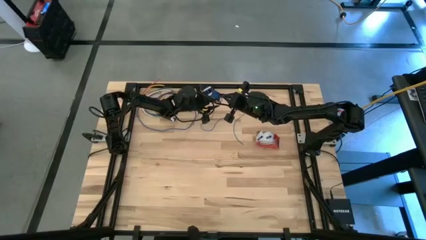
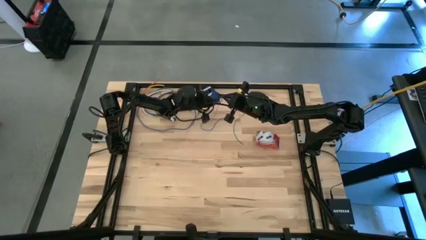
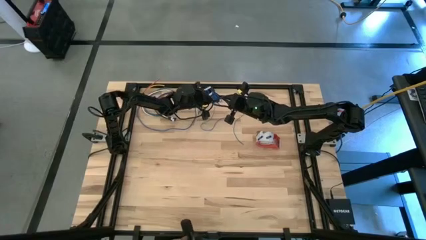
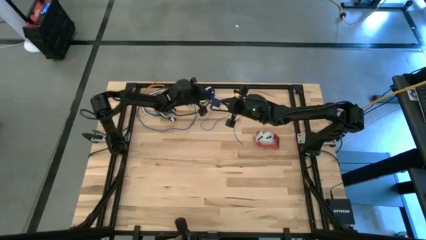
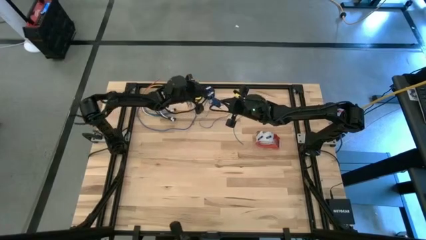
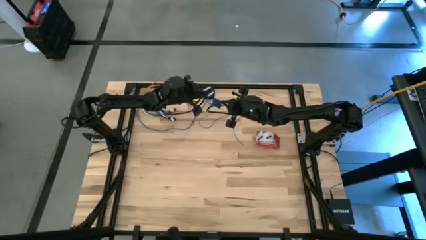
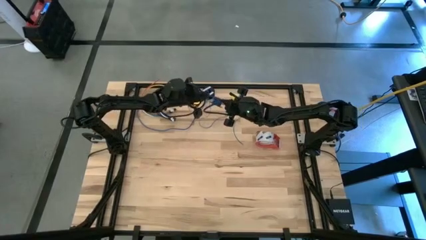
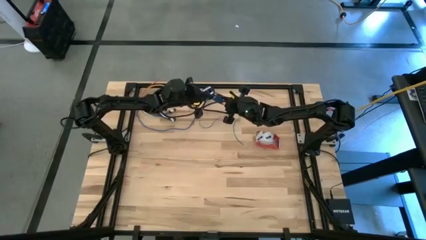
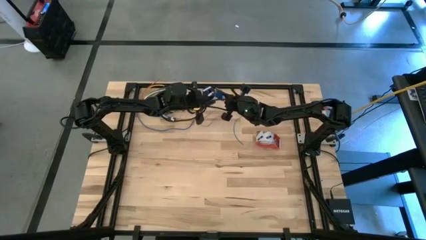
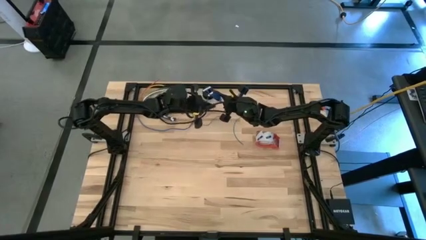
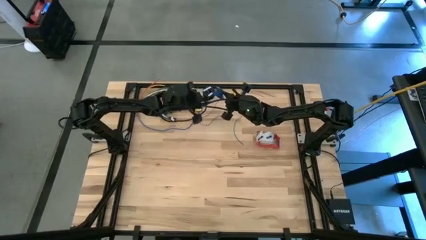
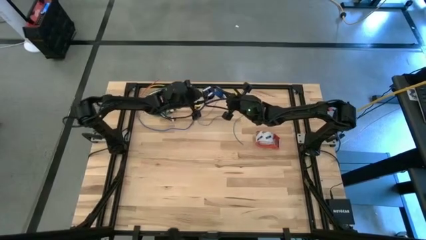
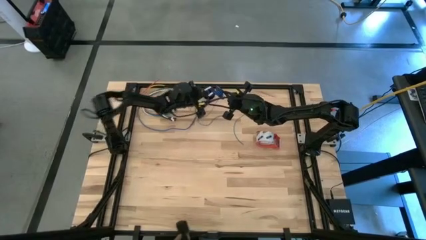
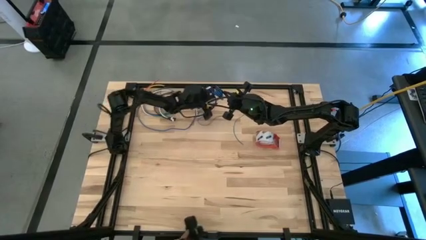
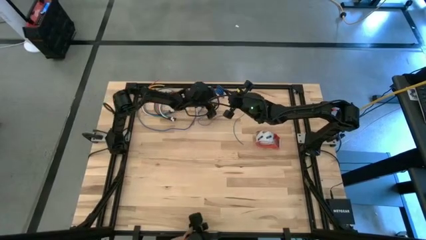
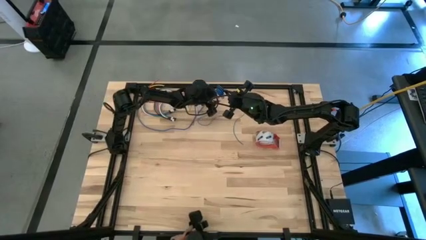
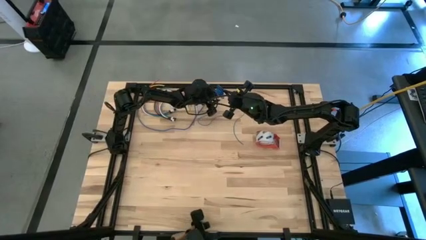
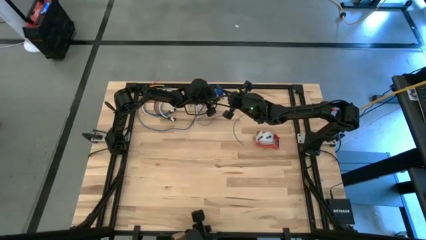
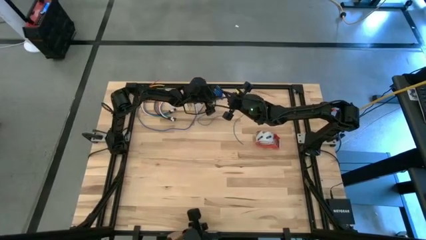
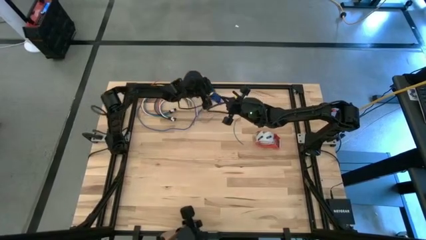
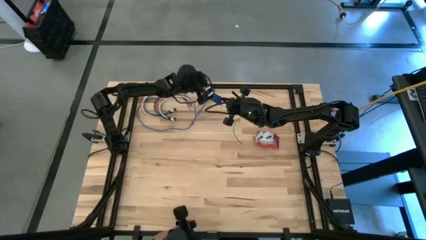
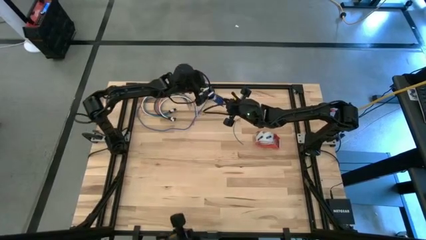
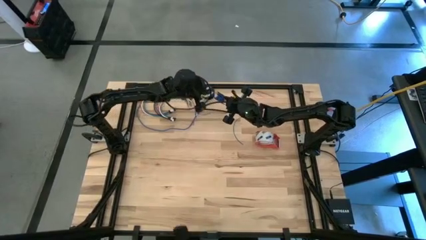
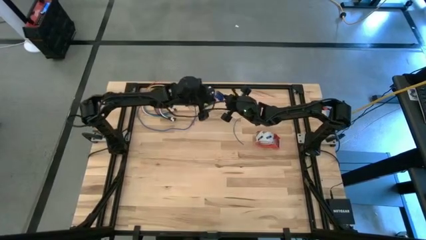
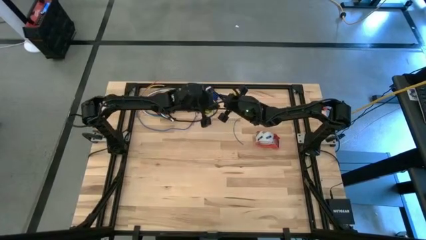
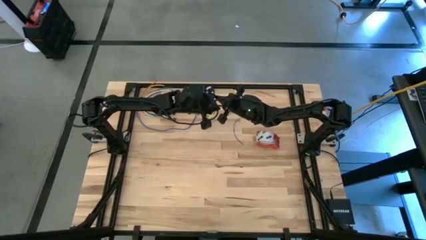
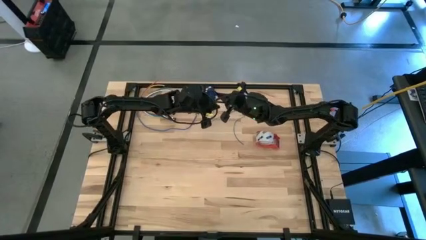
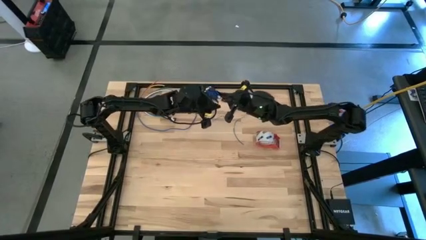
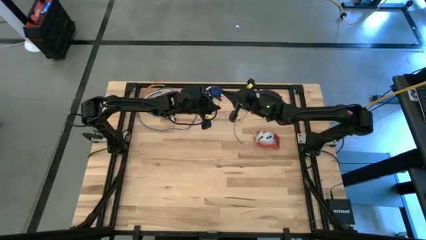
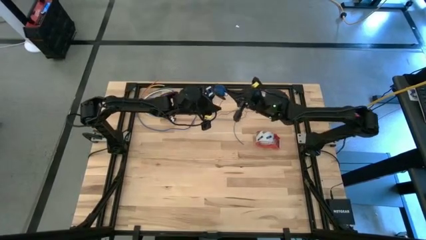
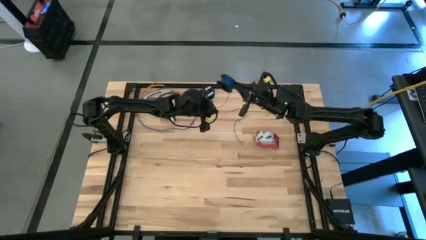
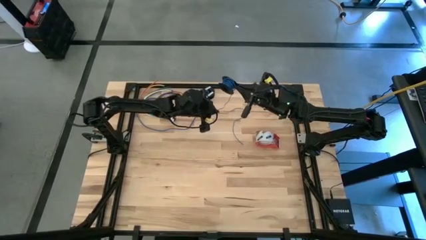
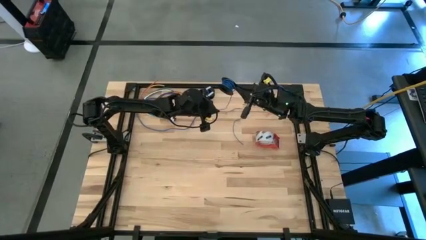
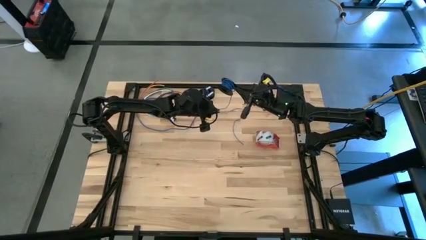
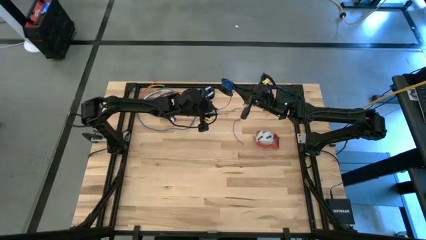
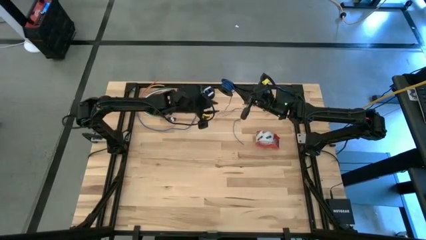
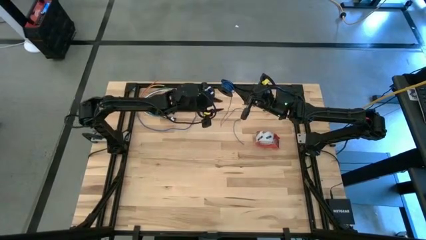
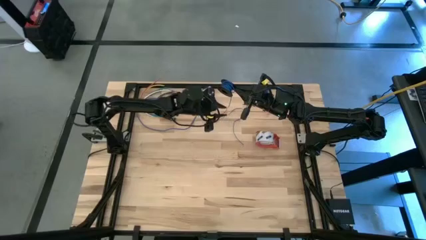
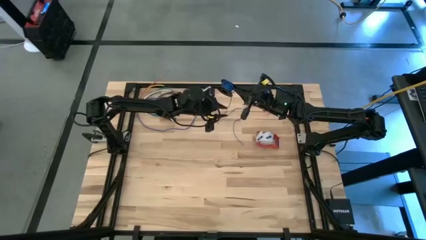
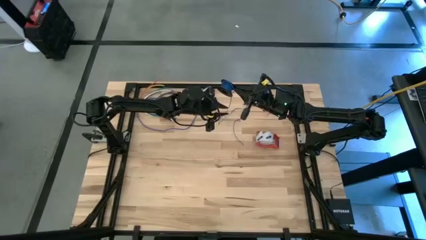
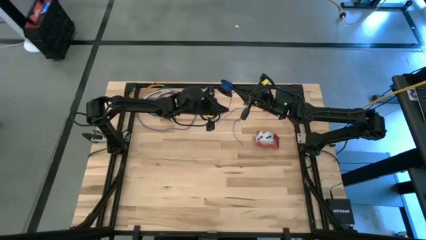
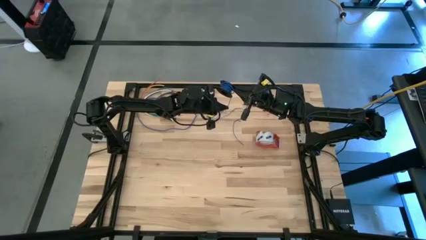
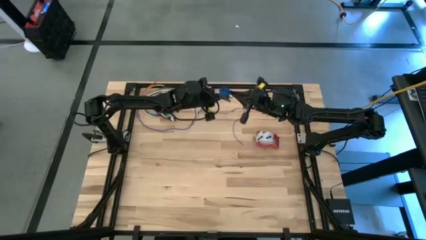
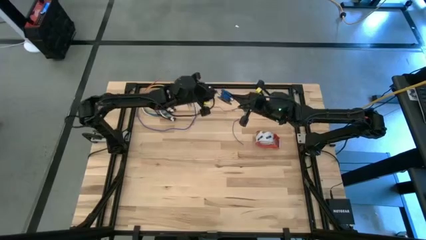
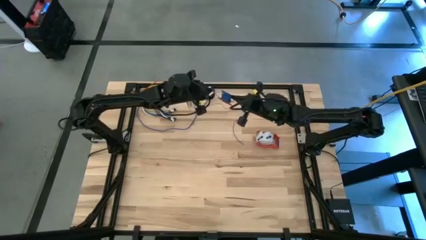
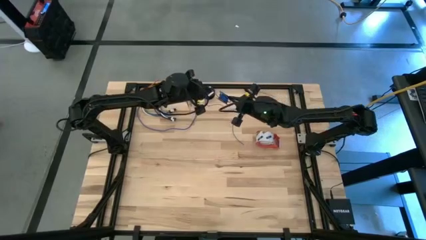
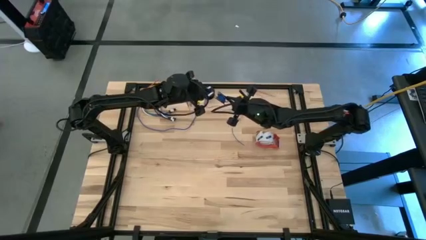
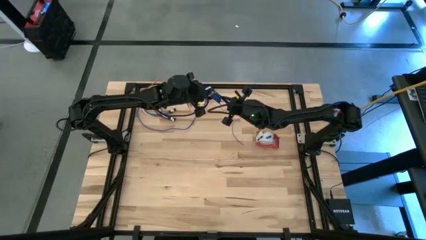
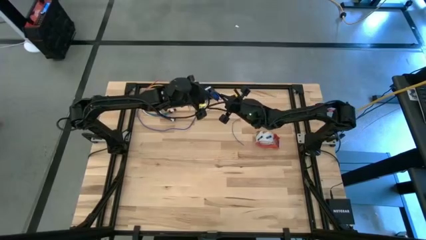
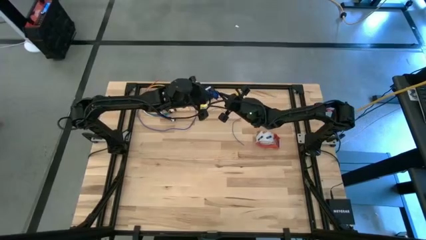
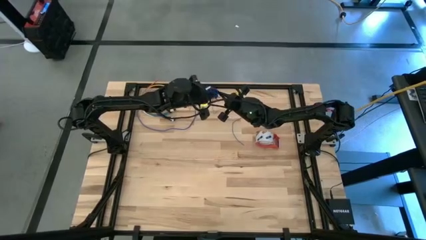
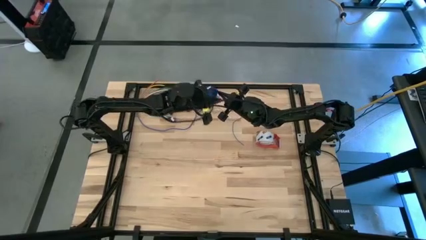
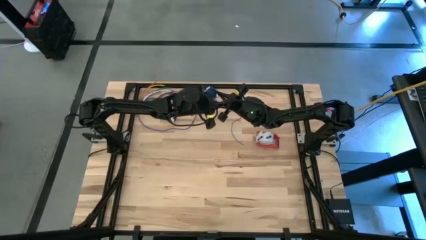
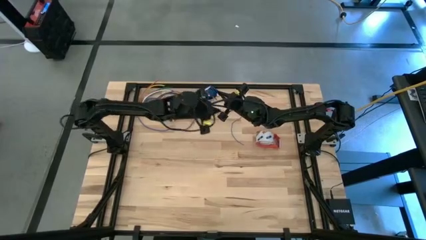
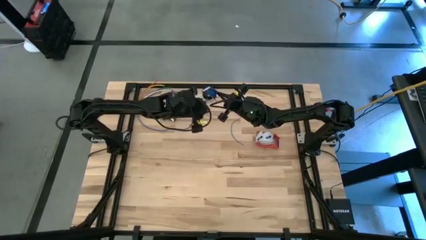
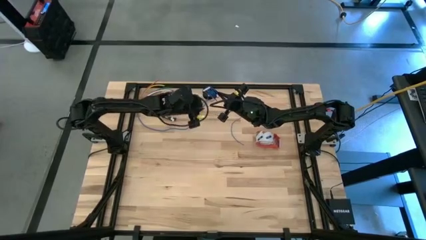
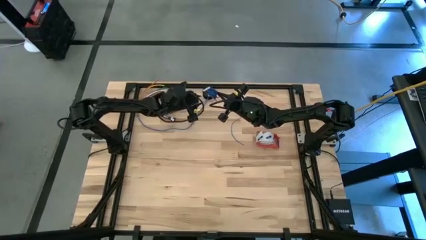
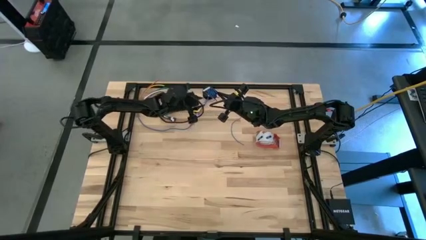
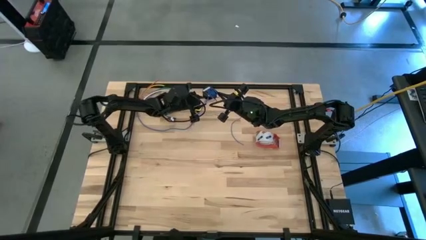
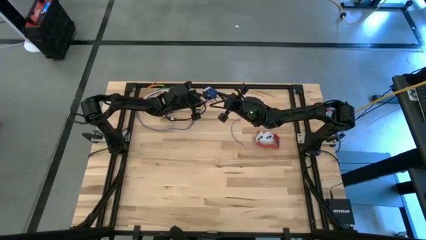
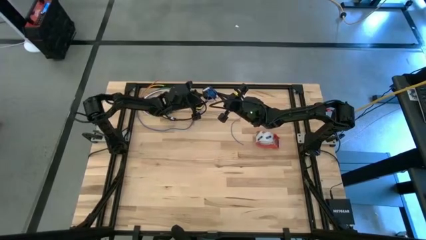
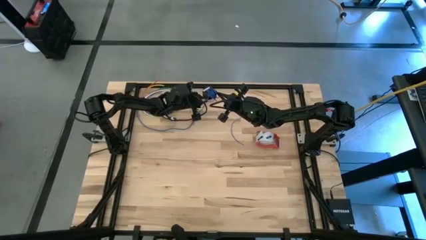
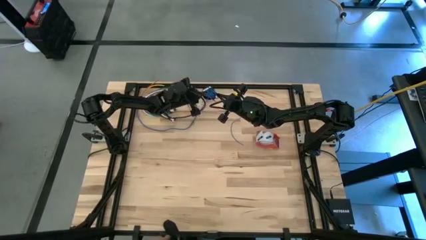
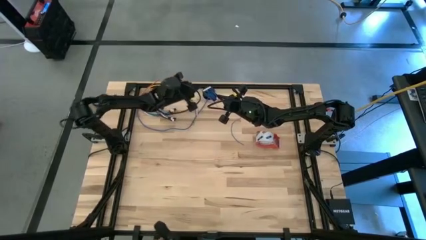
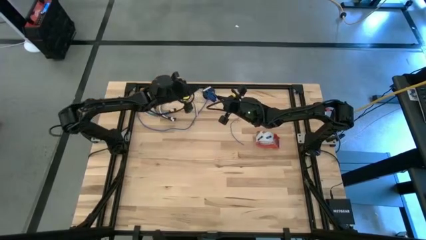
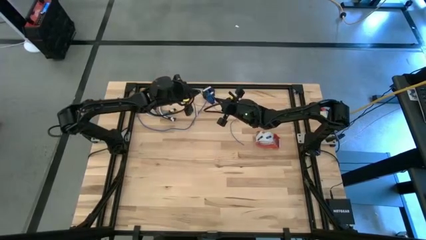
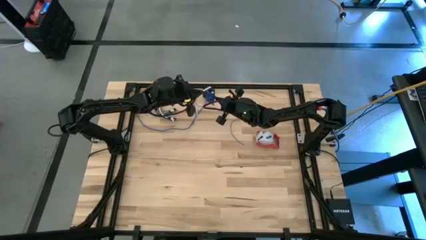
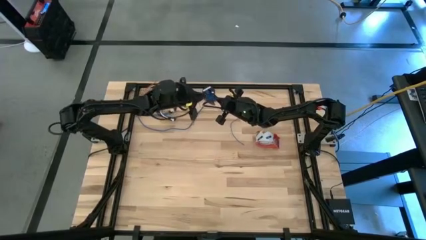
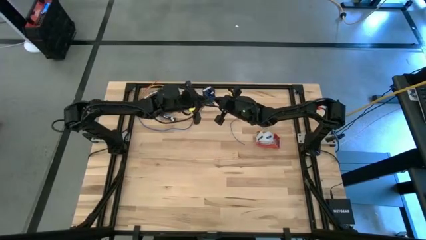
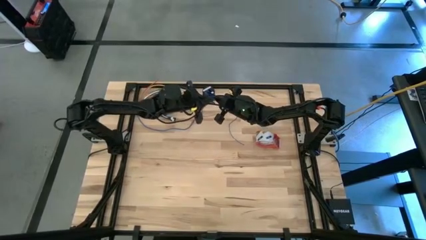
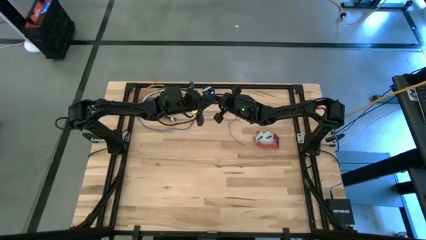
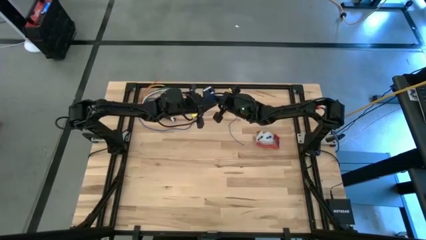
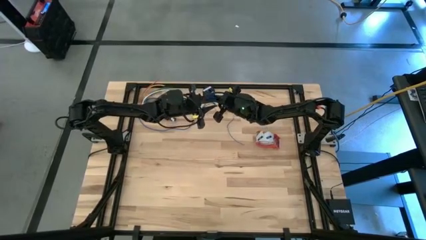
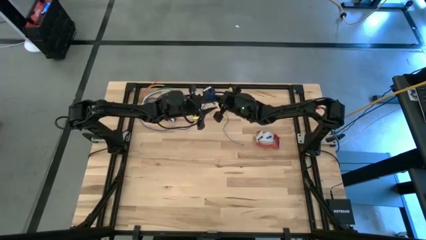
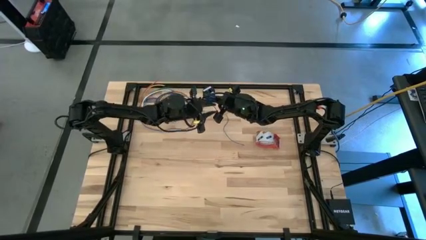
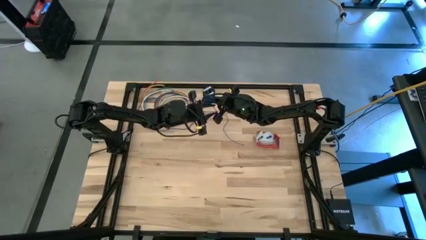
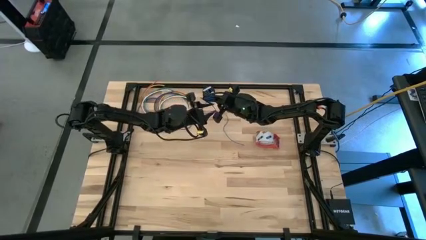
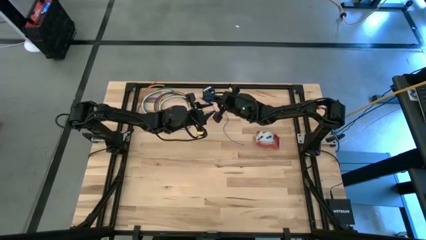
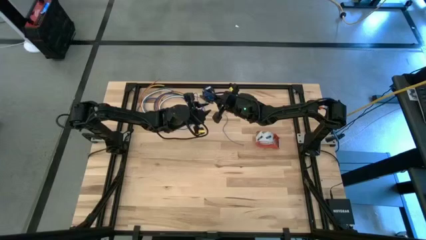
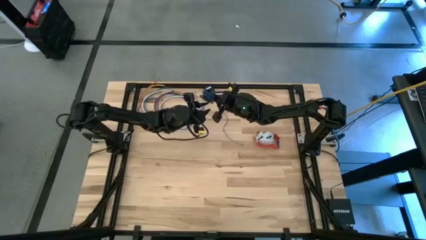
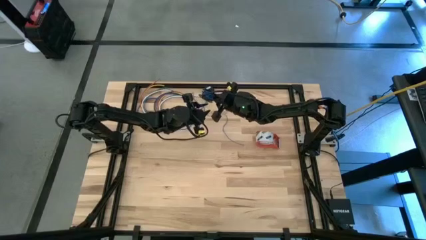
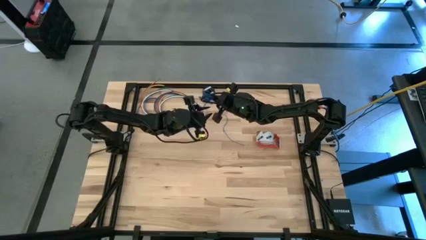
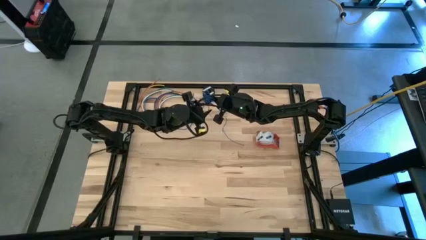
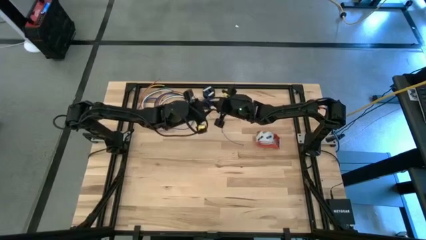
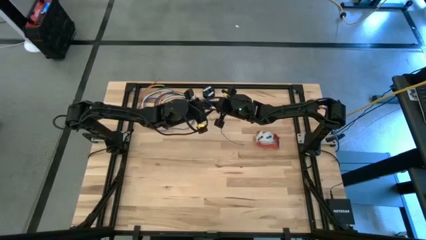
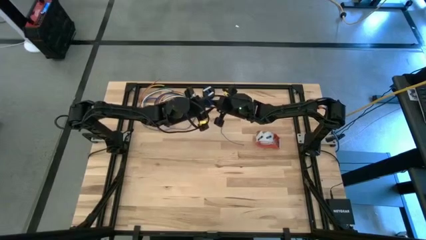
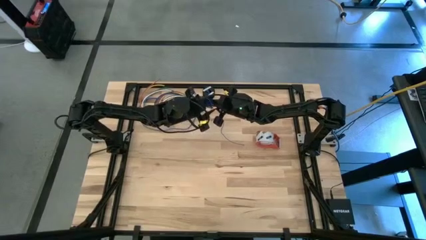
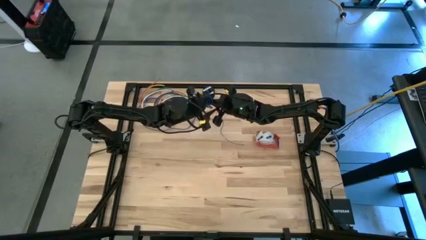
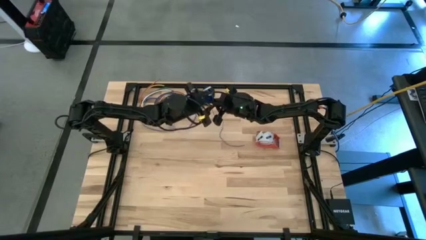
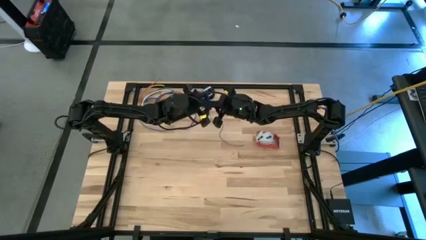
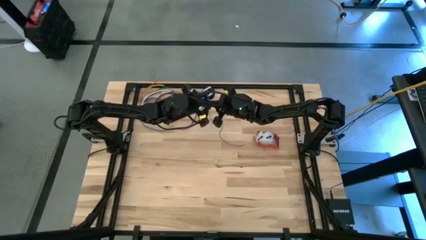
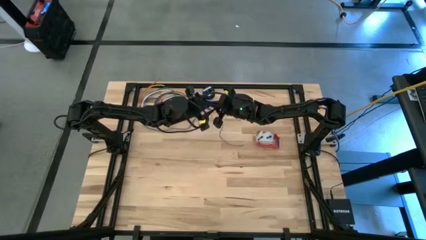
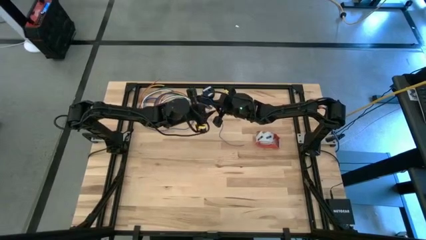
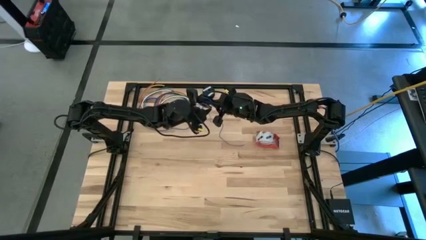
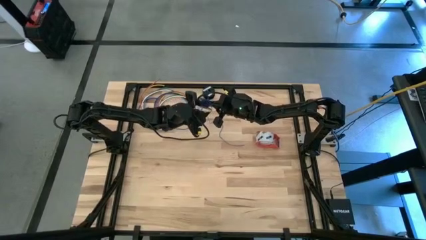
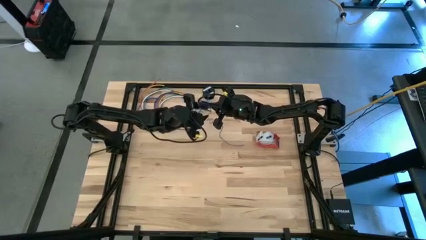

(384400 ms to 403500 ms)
Task: Coil cords
Coil the blue wire onto the spool
